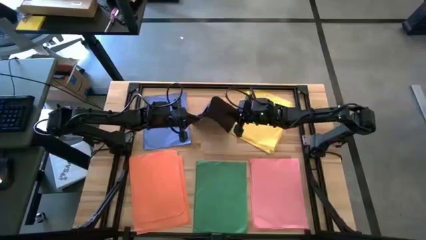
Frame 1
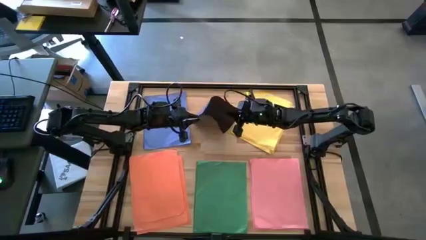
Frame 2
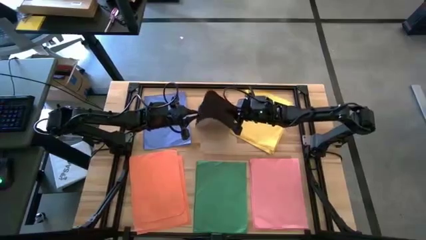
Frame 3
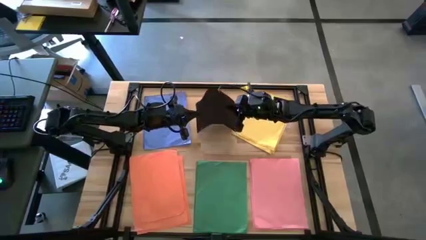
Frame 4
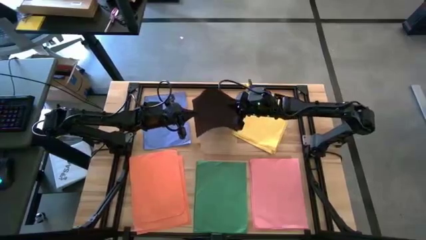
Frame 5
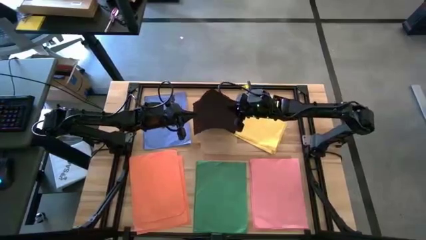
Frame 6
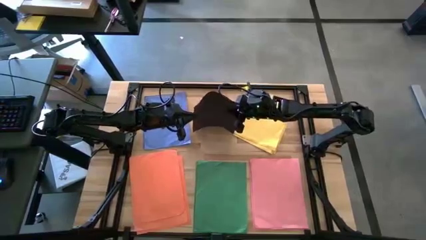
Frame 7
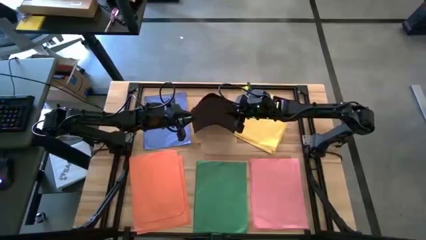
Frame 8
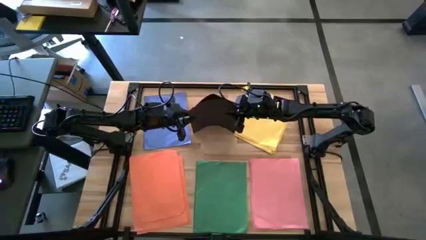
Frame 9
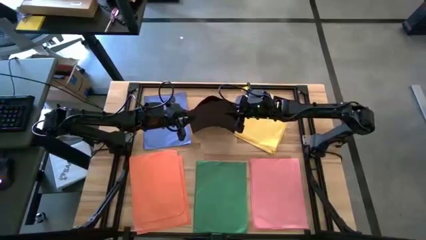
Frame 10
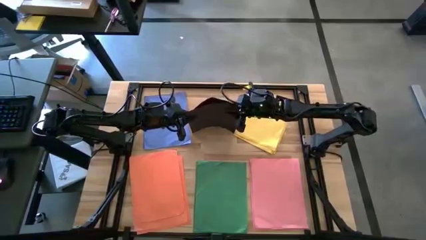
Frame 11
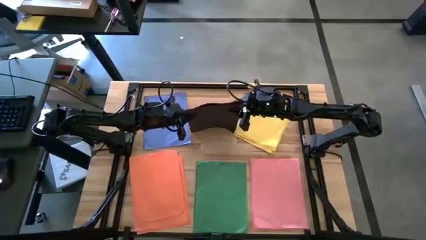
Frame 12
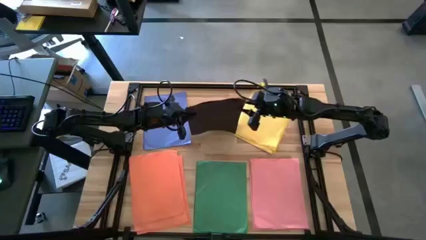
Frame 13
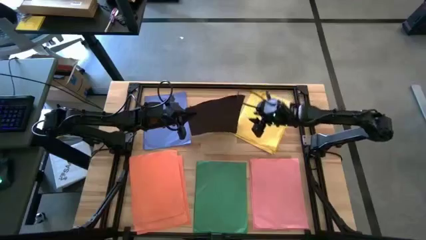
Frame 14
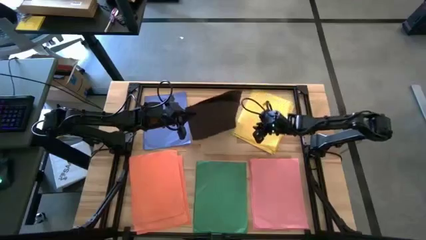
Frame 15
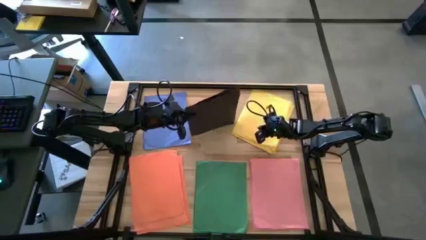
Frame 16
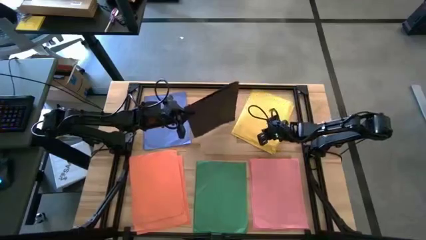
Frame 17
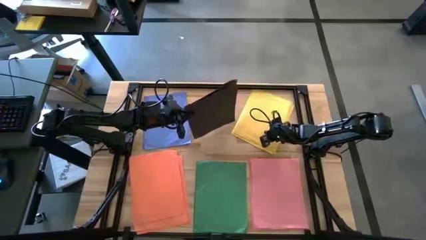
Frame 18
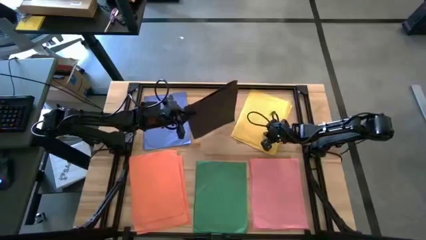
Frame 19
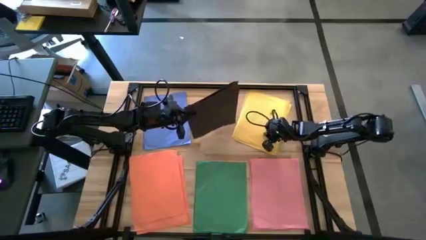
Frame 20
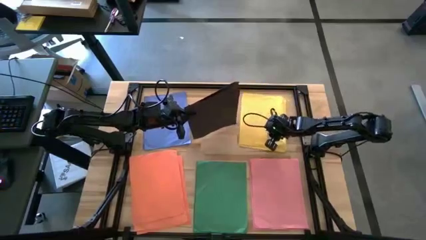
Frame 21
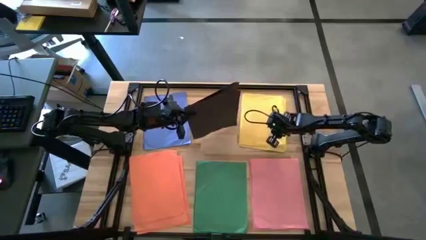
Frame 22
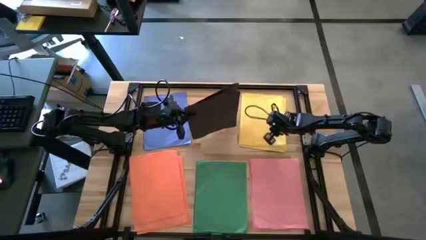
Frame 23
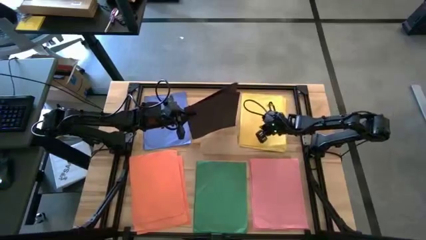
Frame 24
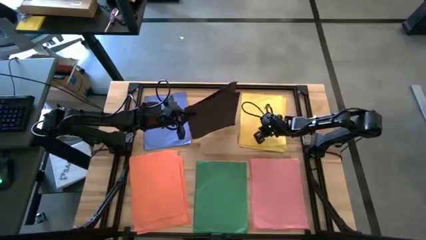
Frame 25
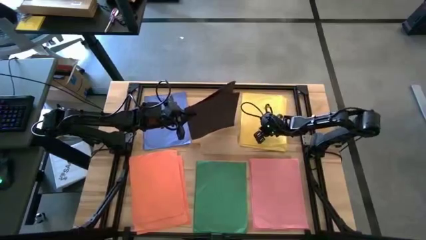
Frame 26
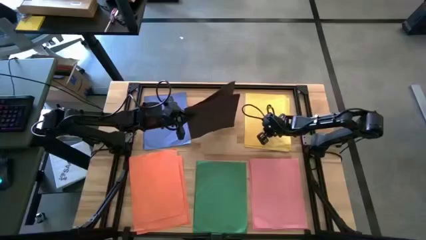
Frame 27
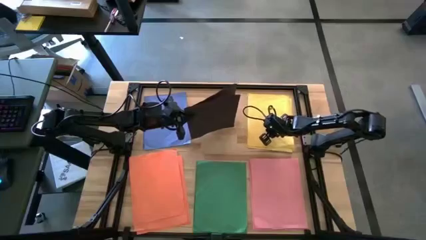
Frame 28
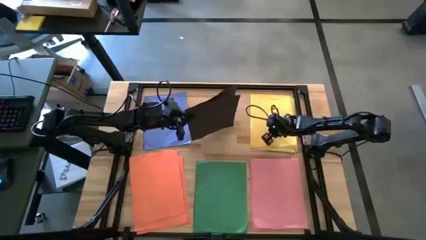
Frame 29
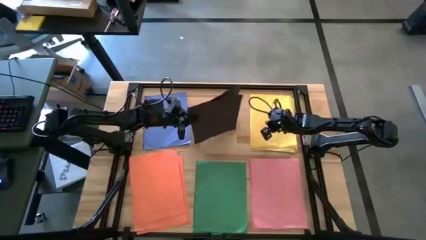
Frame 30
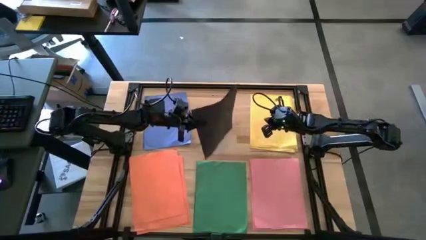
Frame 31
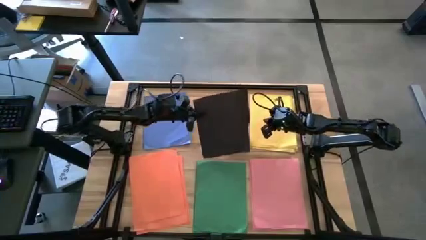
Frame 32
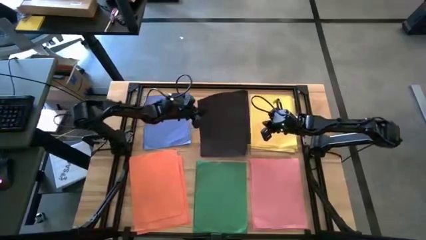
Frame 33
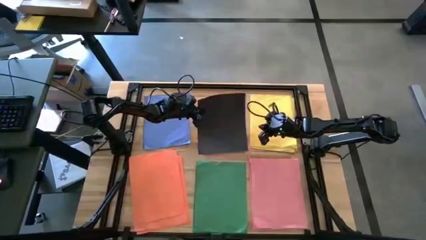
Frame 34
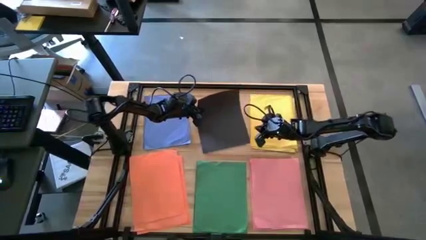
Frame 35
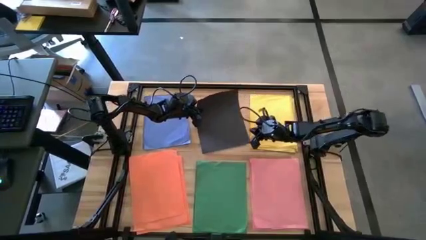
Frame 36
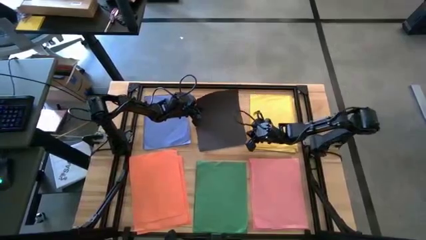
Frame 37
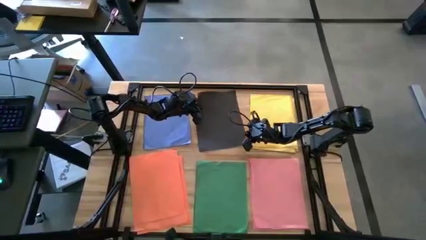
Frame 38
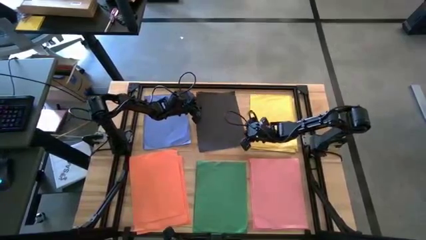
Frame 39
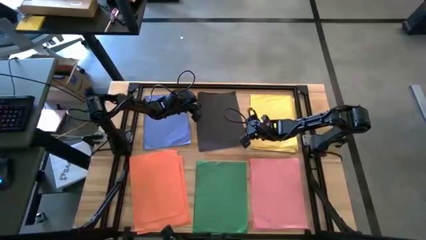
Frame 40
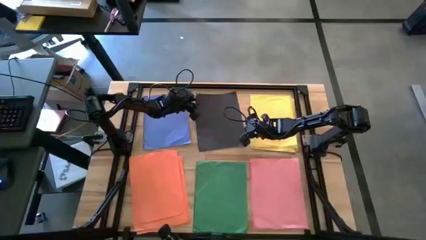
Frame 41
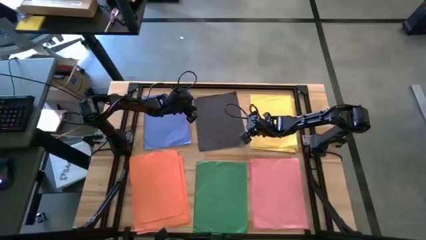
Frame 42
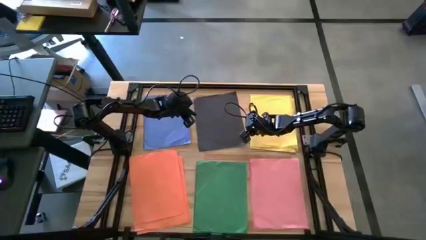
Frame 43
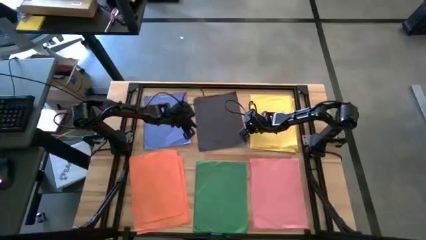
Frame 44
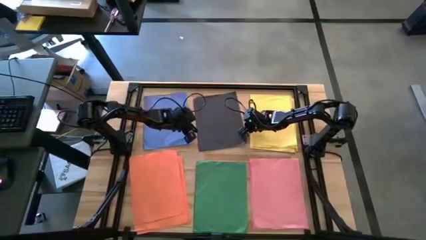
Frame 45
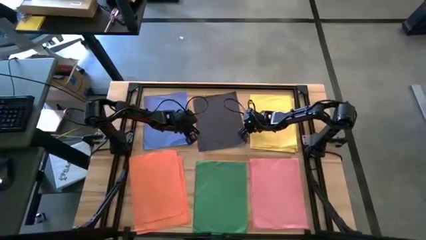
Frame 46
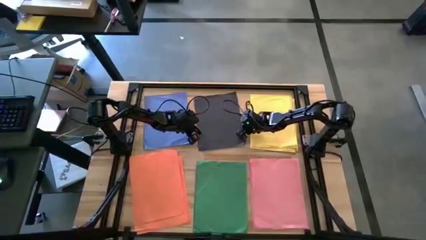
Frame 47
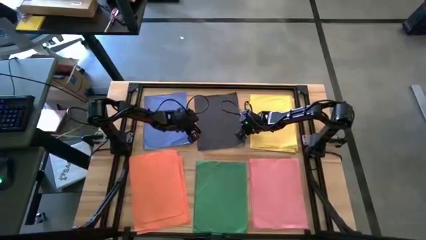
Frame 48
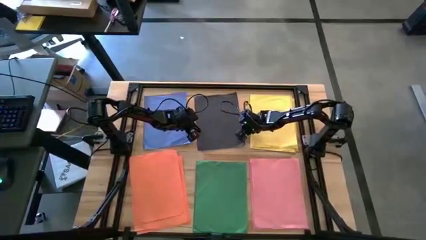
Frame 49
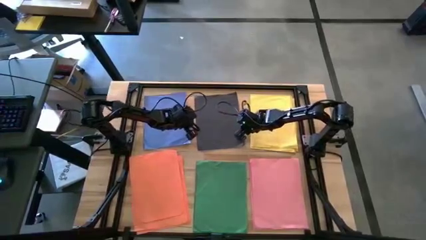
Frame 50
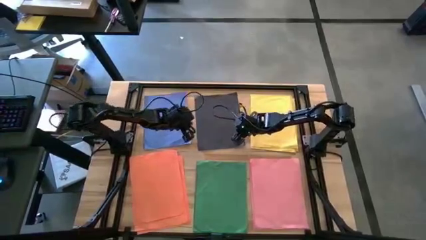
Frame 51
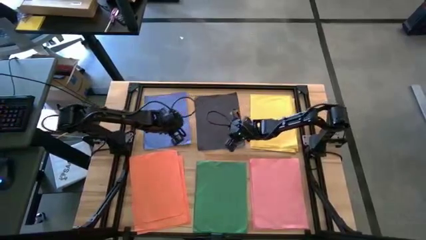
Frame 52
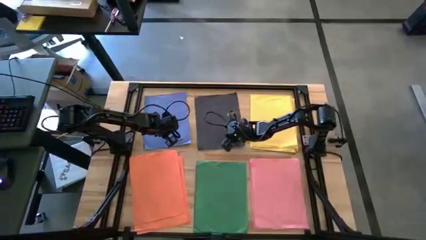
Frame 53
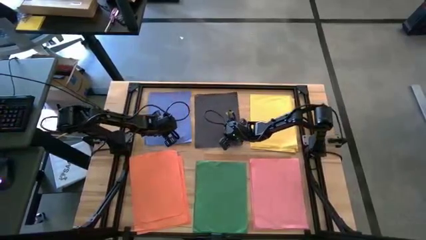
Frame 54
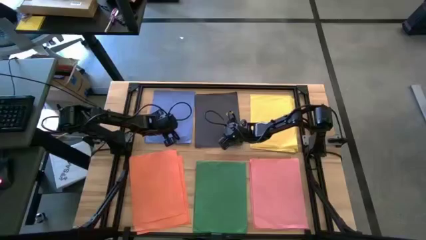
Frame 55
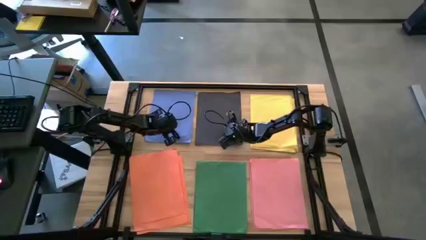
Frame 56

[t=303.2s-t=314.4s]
Task: Organize paper
Move the stacked black papers to the upper middle of the table
